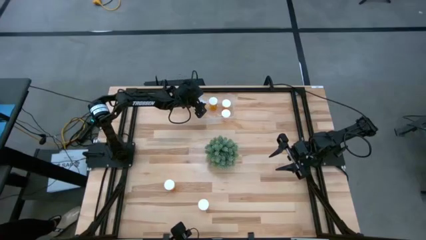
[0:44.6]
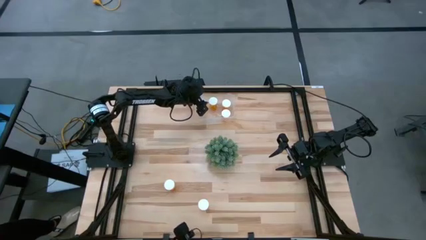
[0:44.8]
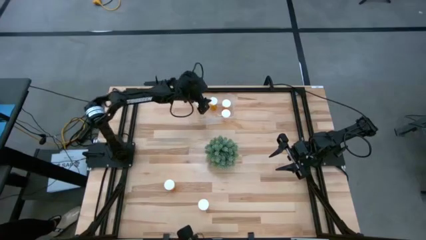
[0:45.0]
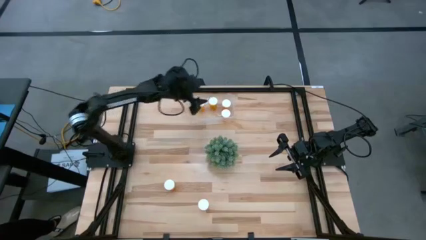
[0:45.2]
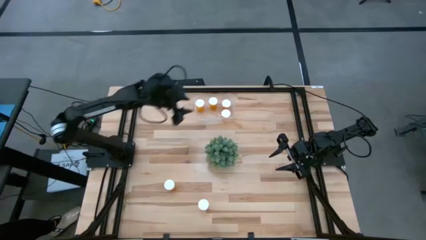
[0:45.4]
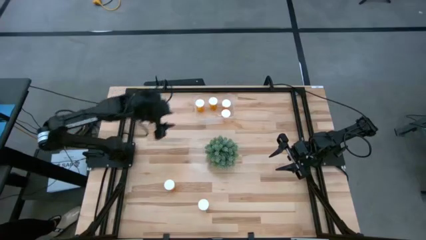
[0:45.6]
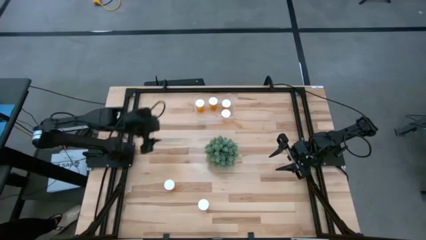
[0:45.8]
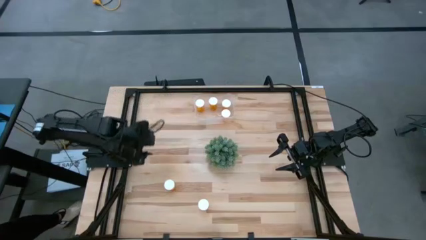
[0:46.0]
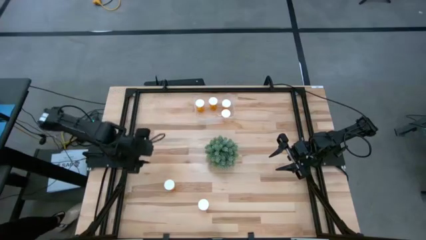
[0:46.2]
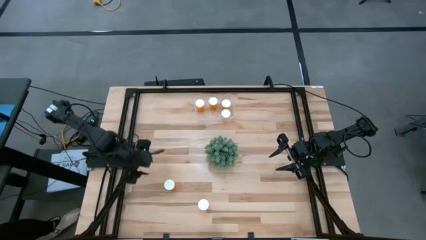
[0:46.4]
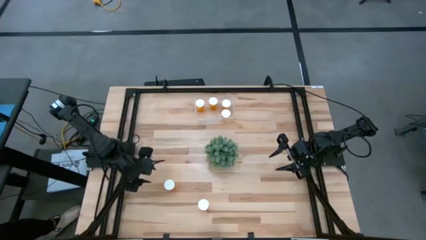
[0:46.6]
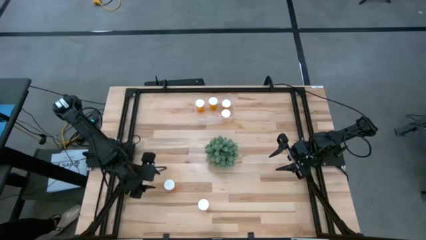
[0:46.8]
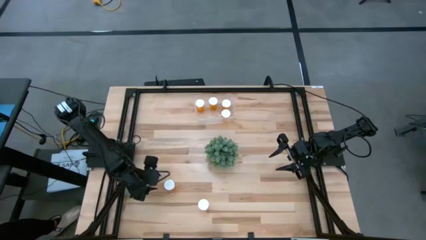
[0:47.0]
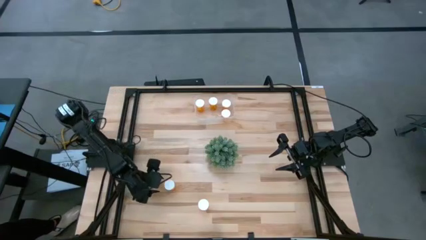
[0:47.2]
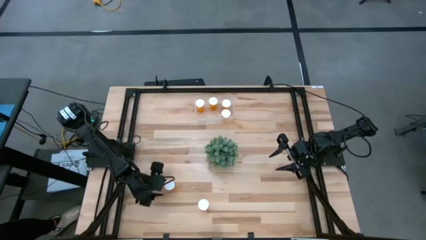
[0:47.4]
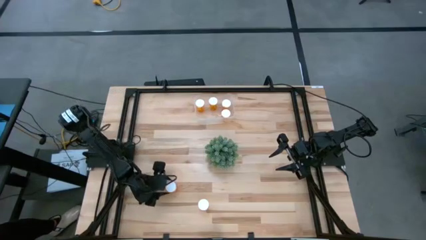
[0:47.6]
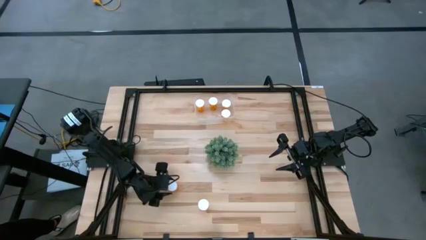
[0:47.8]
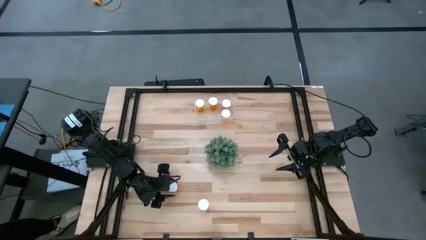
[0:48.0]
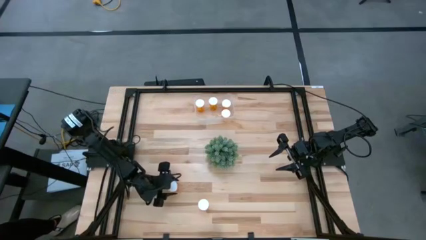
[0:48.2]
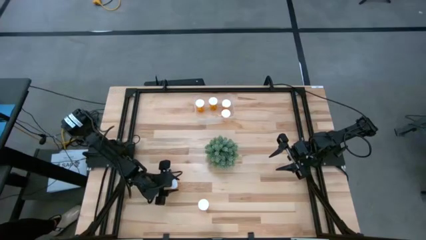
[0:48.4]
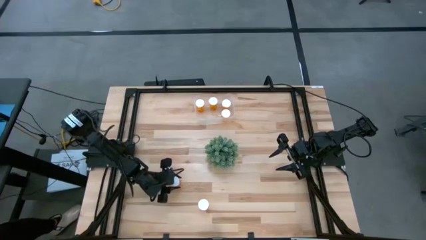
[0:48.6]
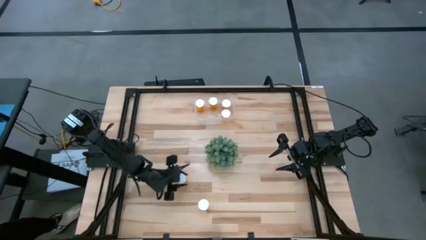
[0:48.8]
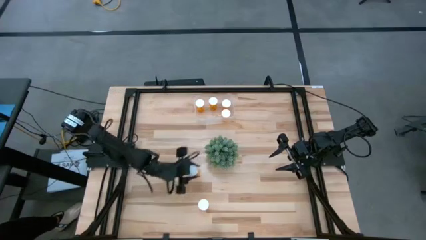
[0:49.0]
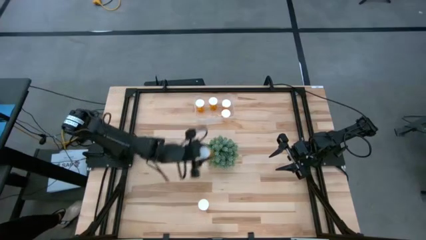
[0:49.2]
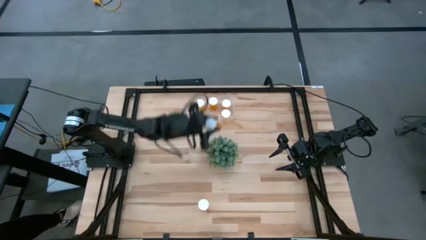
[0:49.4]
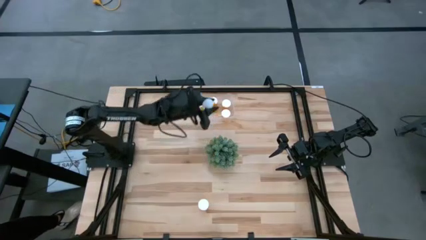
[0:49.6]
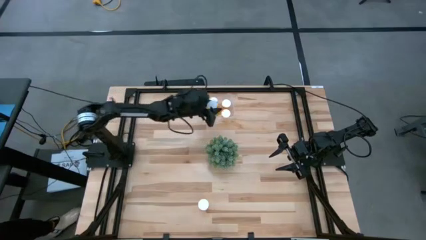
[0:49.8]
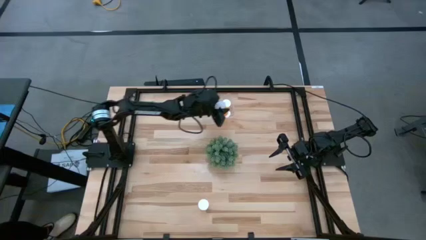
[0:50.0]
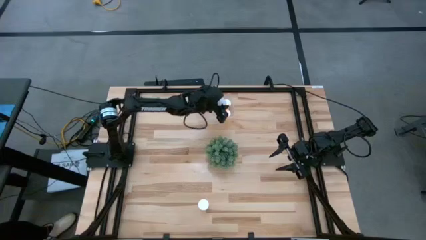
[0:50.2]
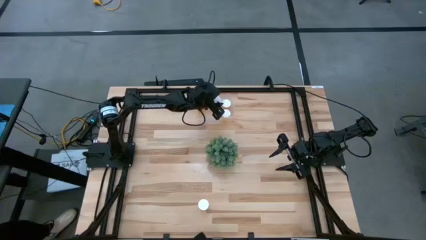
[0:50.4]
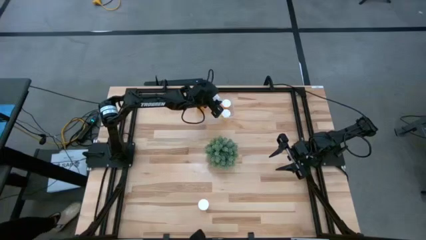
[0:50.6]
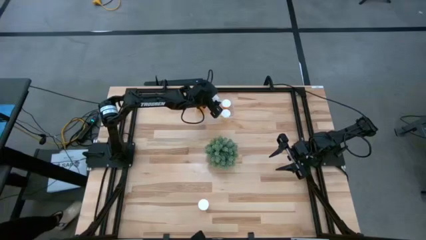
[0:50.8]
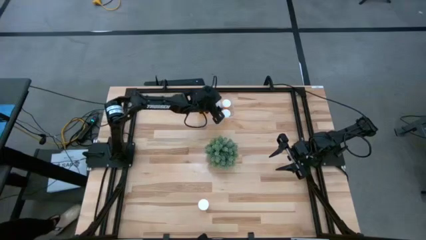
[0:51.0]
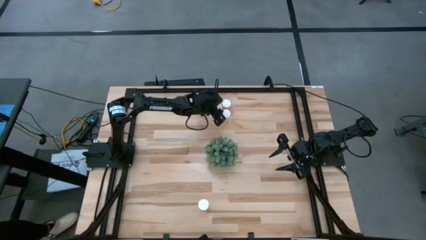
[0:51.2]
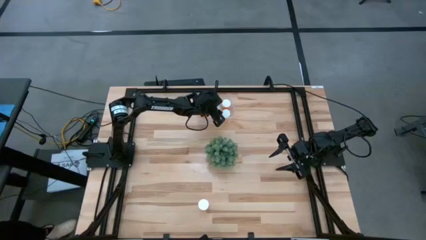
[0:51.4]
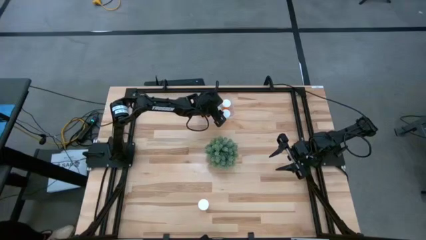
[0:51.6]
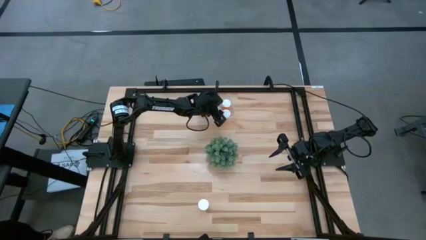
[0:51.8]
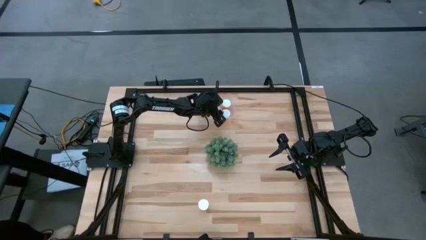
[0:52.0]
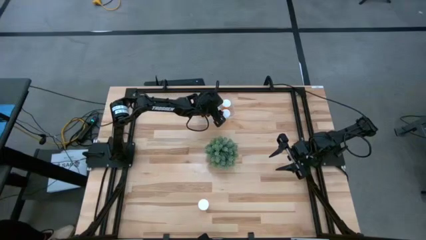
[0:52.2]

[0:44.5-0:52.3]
Task: Pick and place pill bottles into a basket
Put the top orange pill bottle into the transparent bin

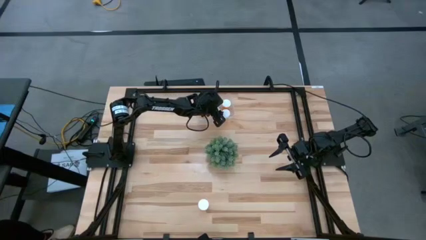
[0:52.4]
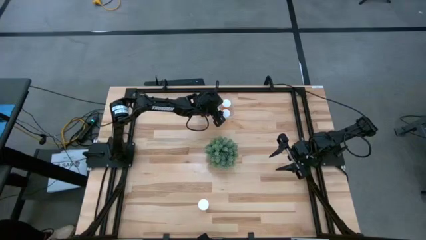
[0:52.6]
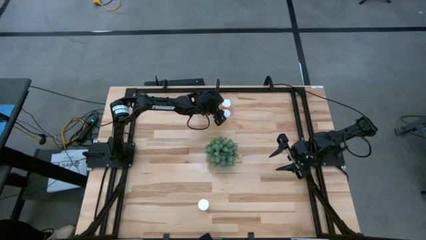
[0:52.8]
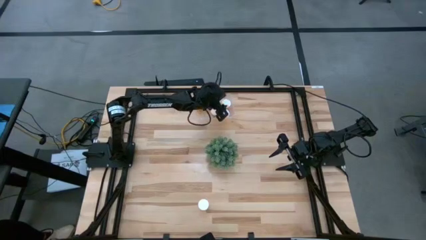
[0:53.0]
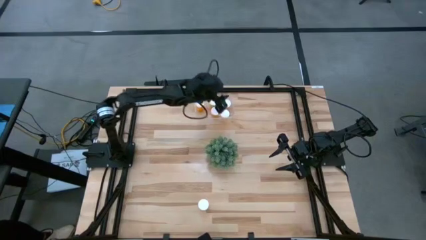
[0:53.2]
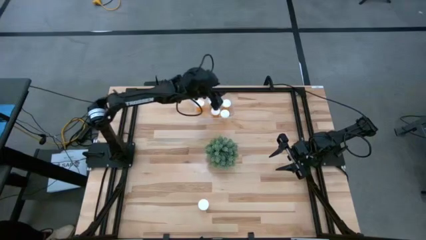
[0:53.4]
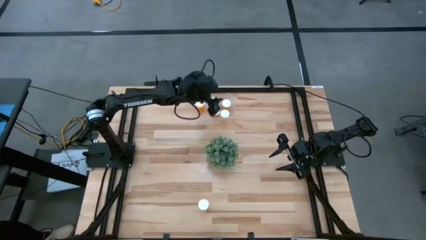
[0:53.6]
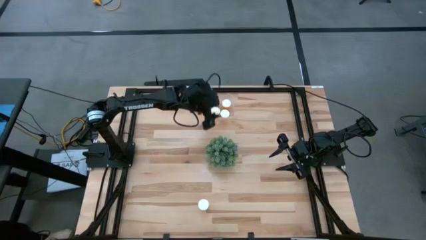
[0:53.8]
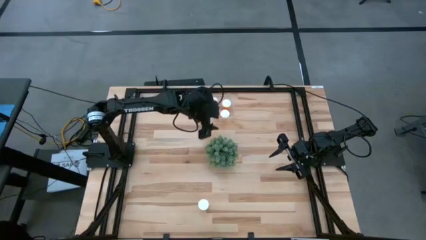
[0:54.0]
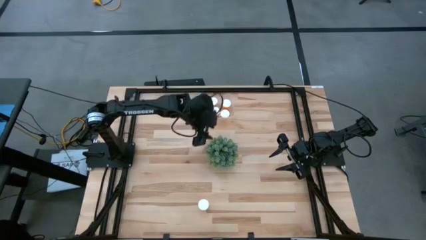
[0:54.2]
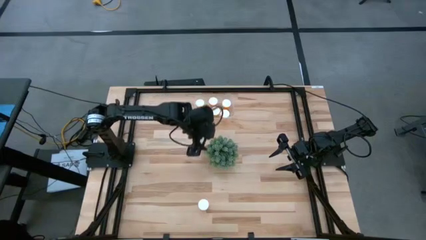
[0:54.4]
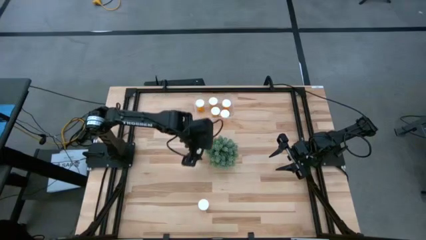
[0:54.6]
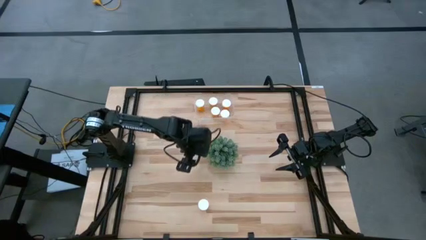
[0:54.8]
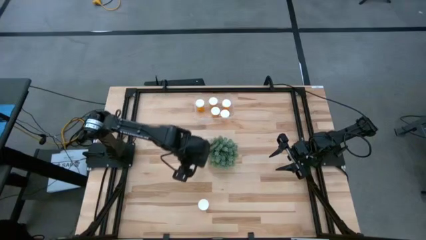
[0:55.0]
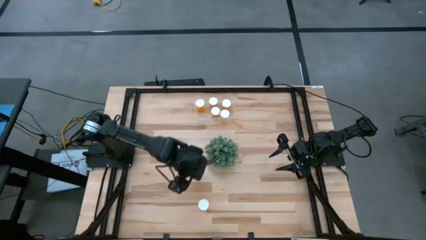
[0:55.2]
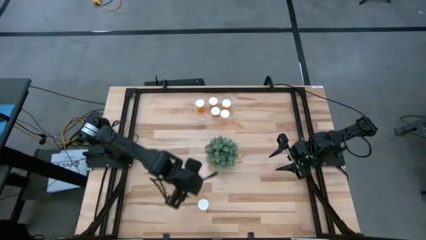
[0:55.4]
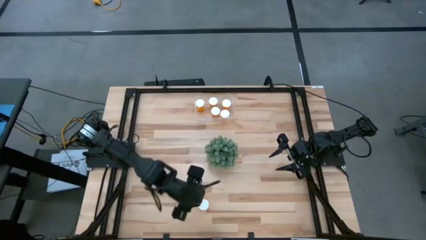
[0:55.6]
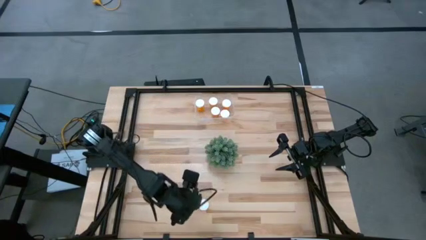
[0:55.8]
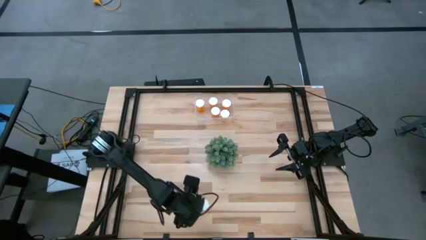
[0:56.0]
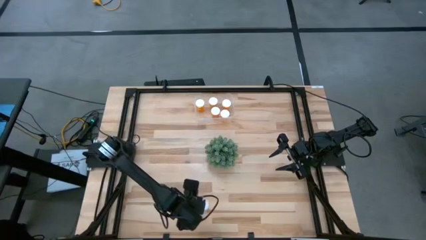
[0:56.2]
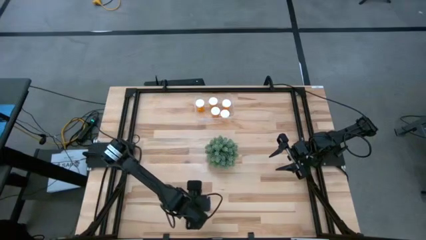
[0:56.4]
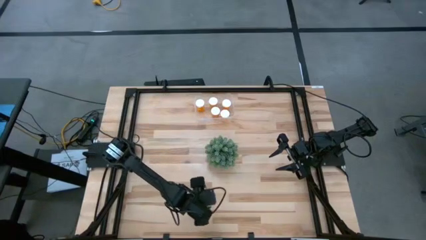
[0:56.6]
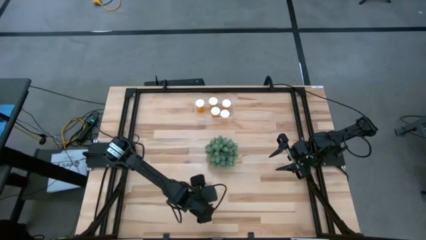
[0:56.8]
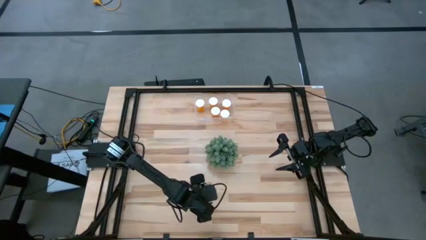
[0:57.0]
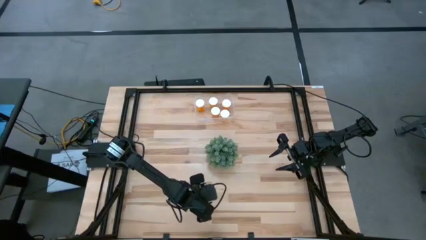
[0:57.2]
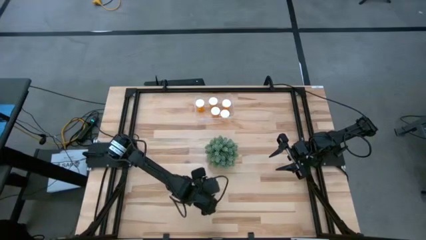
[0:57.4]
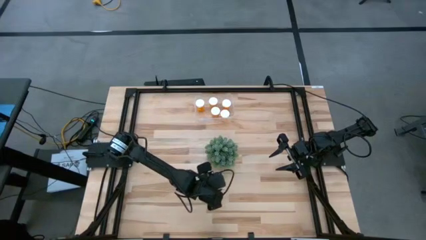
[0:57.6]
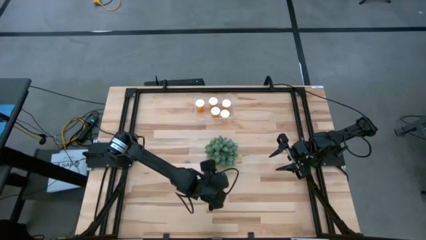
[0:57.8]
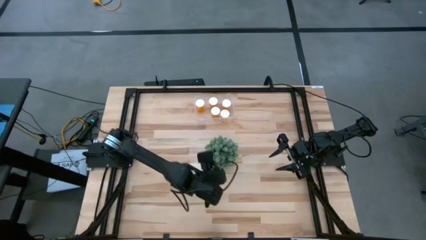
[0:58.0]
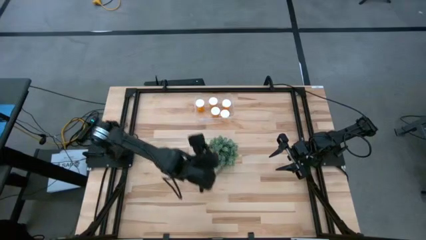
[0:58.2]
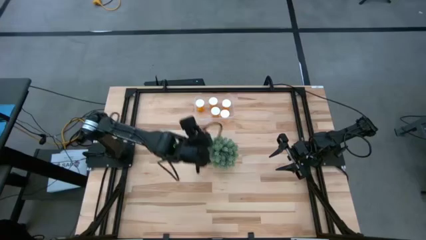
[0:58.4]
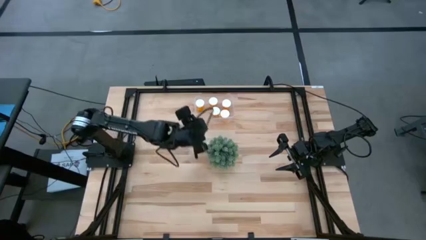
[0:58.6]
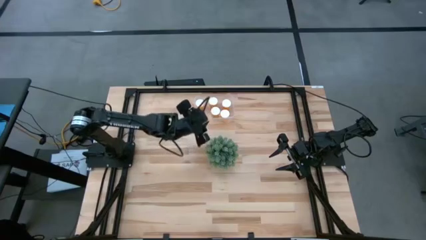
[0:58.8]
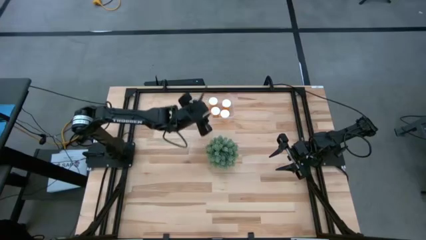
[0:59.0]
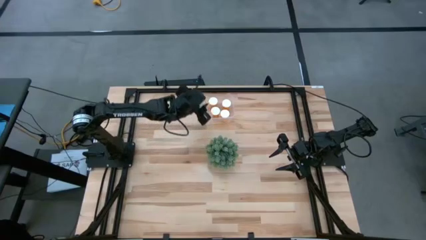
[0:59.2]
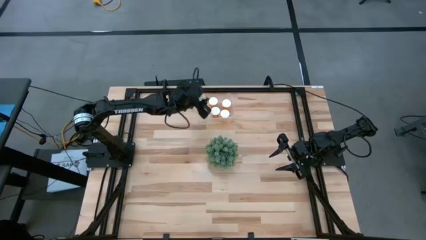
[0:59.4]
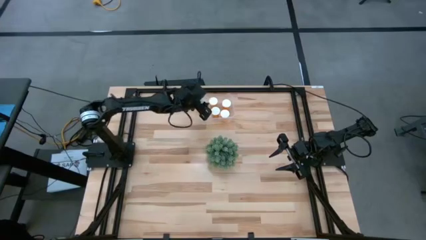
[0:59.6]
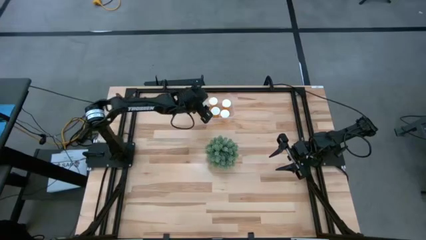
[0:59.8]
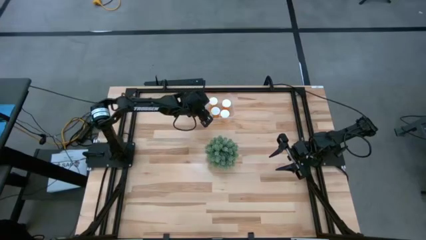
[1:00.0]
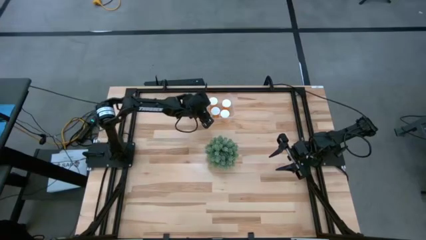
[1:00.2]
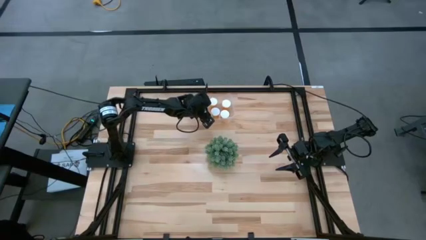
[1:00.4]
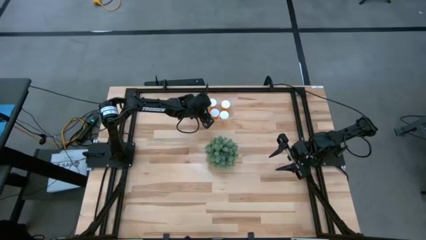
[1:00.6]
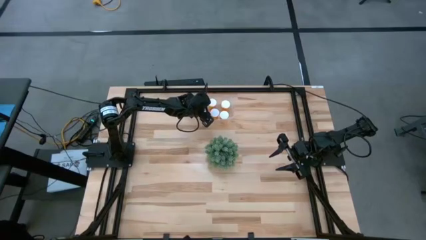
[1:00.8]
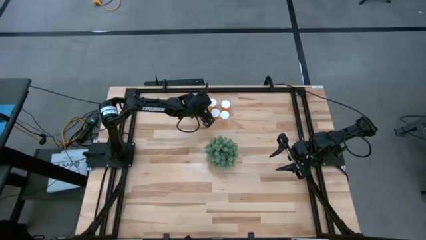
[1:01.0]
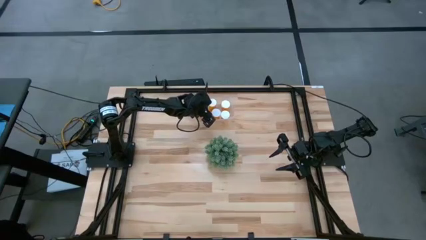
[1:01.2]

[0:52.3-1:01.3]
Put the orange pill bottle into the transparent bin
